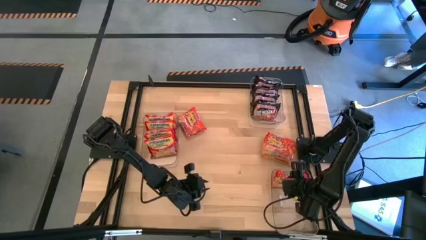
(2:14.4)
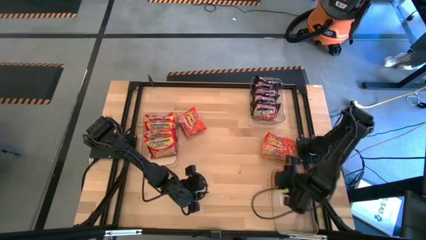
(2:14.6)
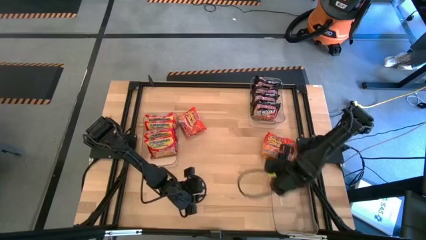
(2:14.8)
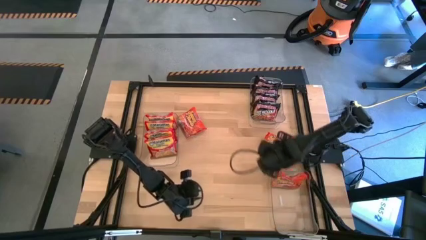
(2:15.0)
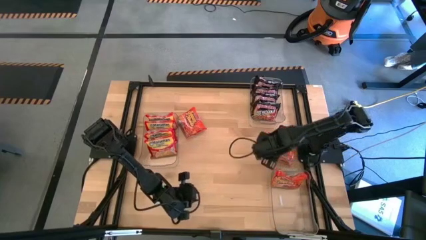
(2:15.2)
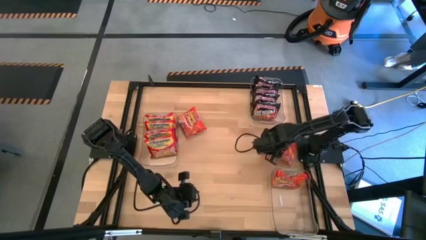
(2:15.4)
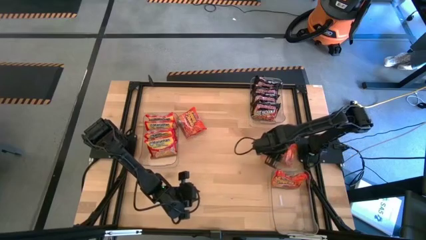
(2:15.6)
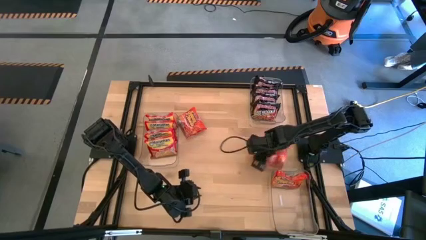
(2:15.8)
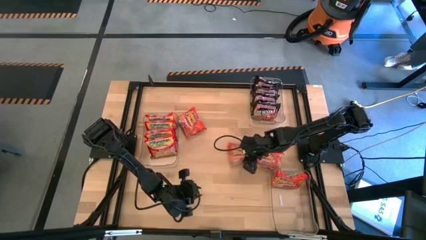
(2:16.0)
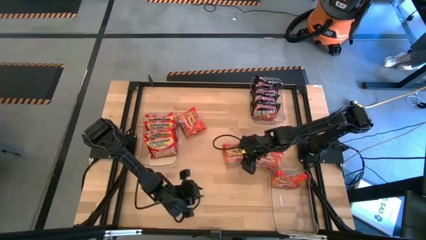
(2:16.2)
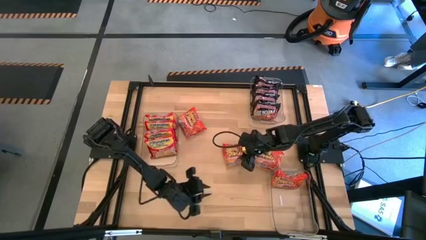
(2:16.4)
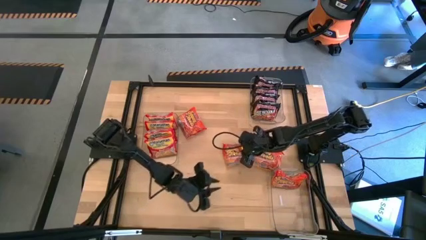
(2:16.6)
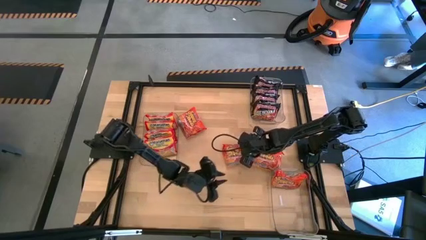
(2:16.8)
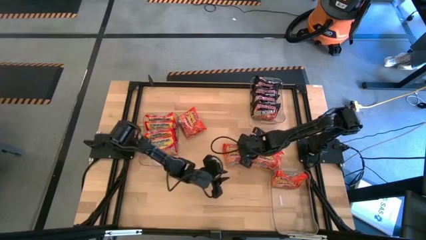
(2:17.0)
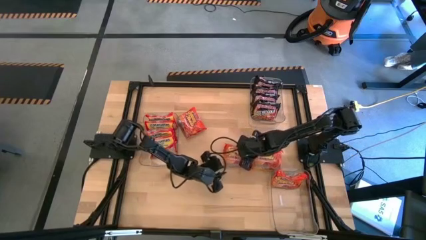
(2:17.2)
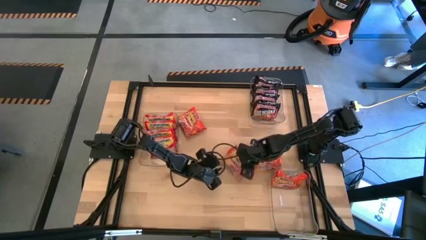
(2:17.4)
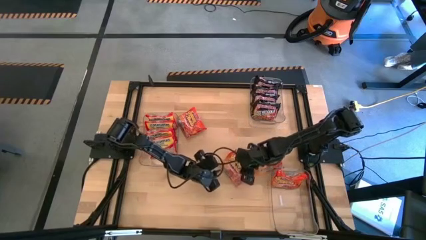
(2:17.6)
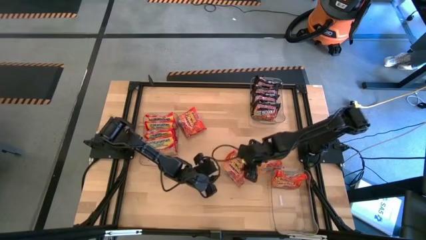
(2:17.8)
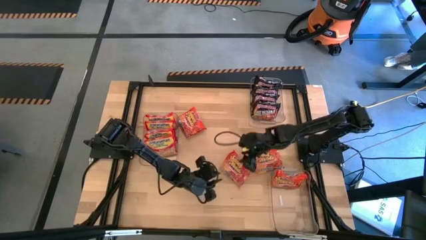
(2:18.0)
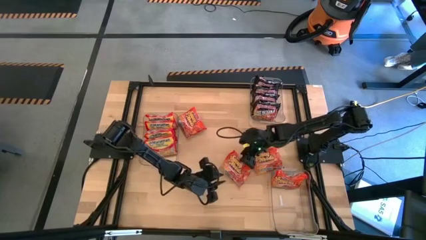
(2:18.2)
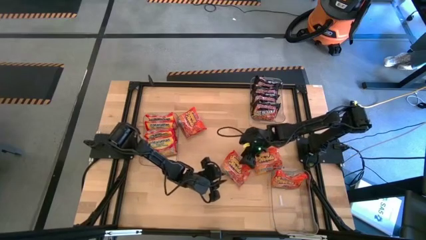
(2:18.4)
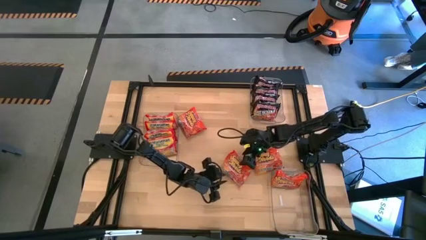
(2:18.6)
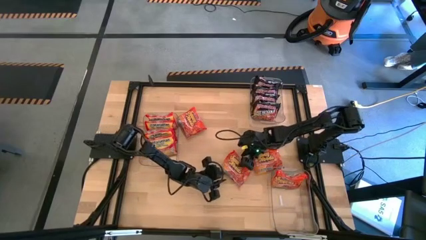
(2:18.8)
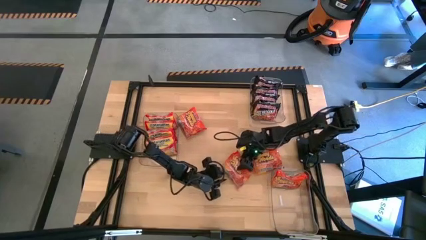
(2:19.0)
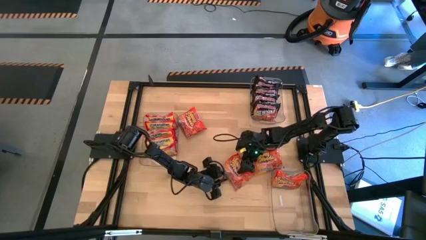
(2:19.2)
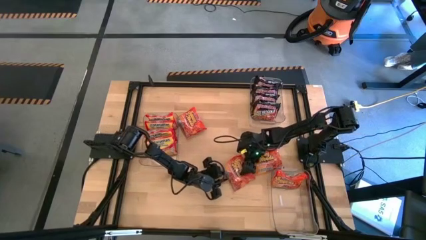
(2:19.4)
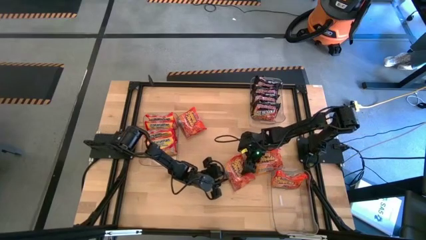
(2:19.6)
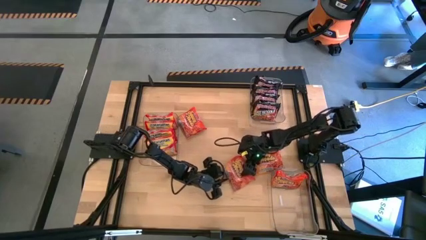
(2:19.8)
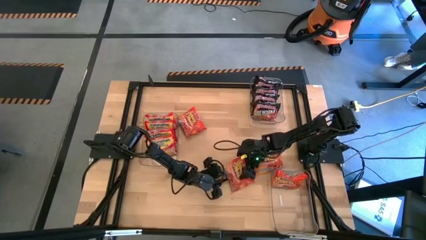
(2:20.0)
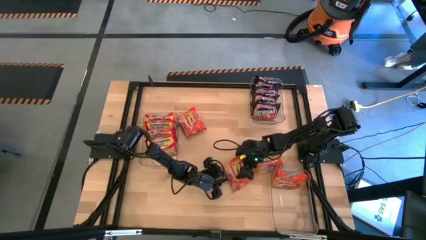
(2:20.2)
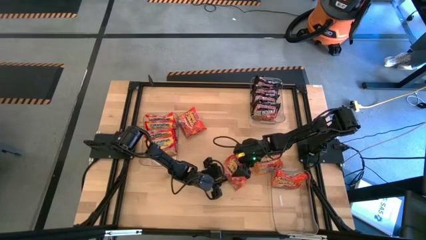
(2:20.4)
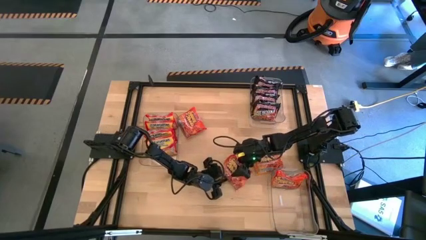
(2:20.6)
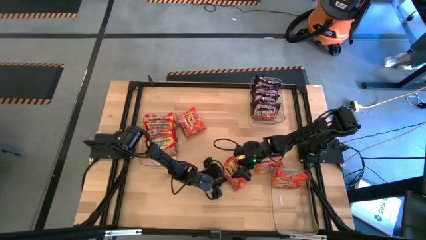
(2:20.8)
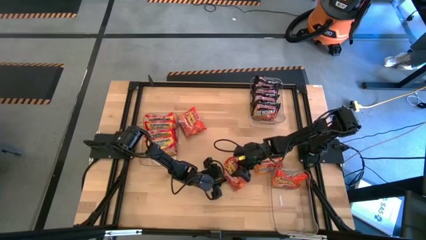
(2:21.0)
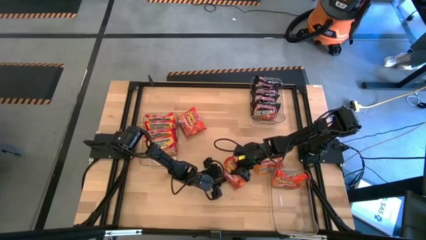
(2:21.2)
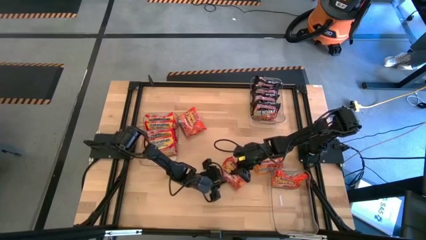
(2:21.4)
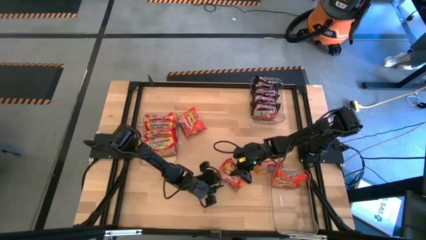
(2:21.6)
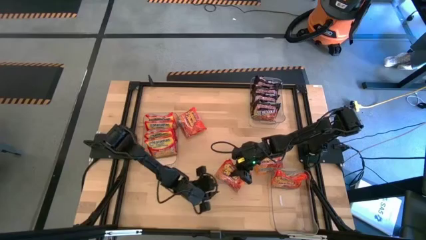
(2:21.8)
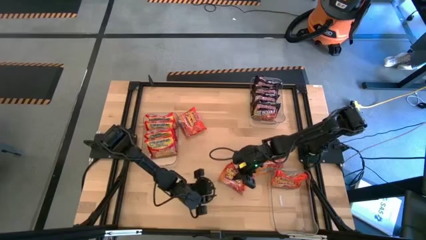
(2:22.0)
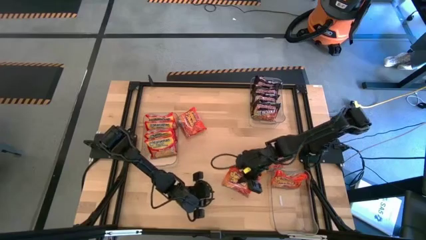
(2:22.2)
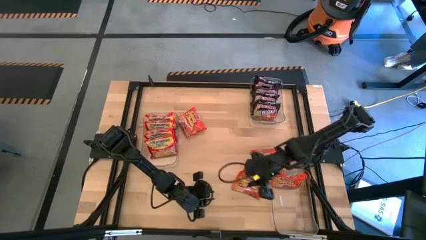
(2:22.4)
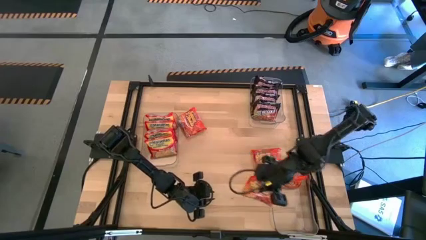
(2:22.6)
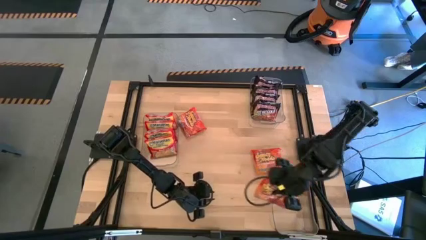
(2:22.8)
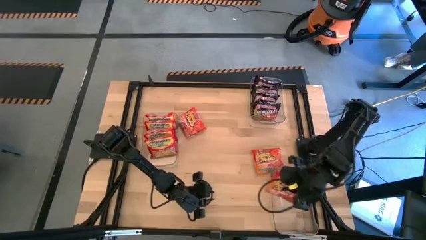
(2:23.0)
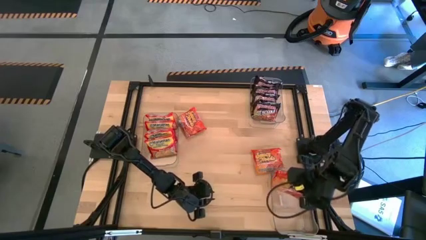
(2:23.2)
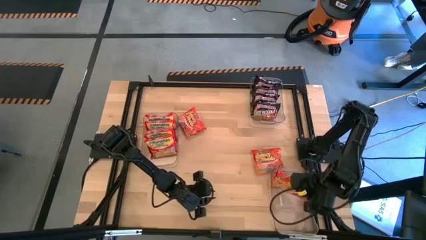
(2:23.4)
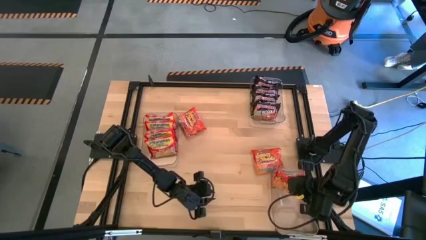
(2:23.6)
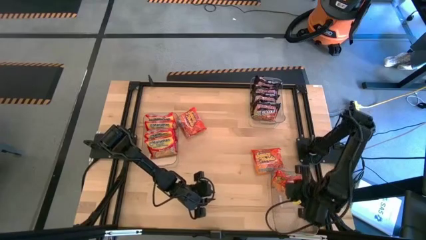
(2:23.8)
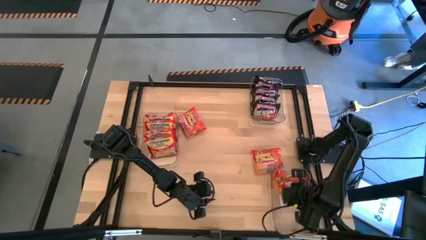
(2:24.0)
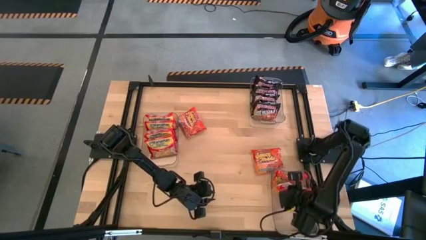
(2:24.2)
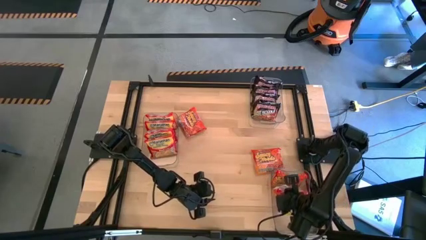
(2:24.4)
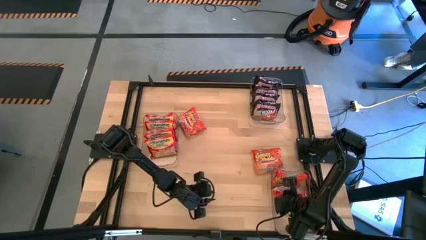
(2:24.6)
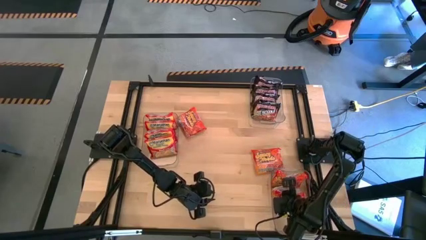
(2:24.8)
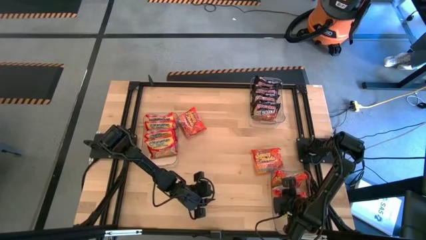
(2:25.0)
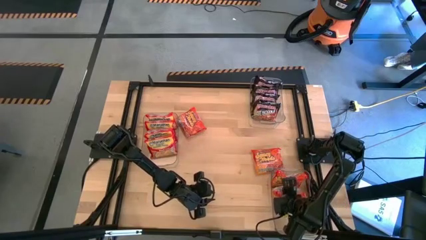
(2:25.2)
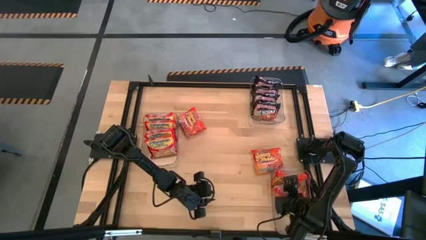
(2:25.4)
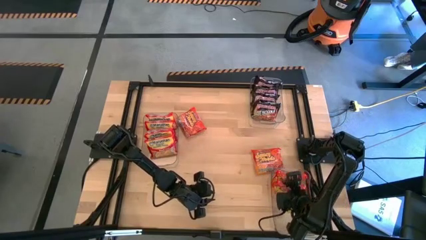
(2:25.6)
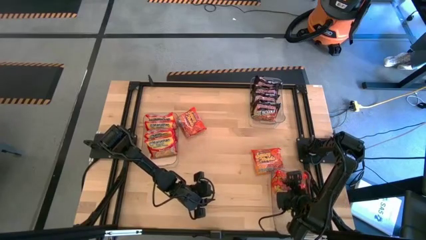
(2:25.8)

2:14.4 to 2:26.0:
Task: Sort Maruchan noodles
Put the orange noodle pack into the bottom transparent bin
